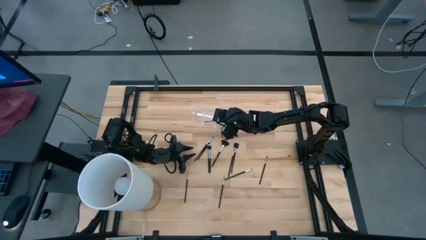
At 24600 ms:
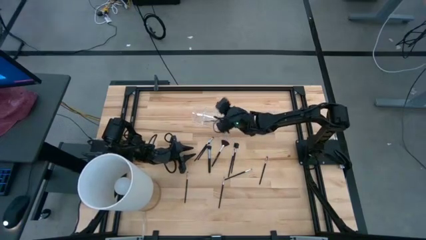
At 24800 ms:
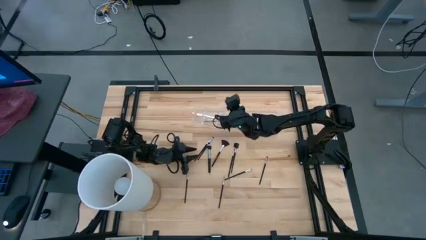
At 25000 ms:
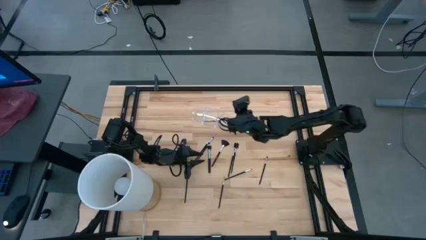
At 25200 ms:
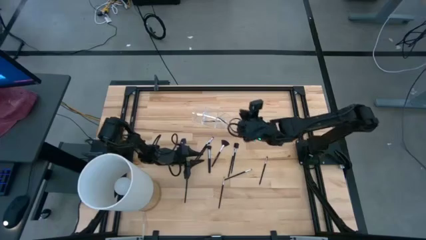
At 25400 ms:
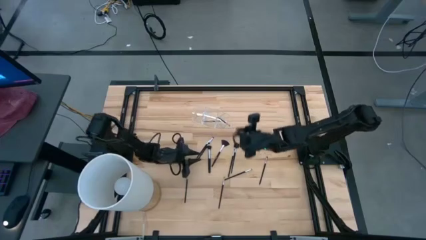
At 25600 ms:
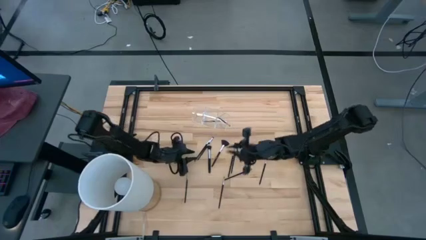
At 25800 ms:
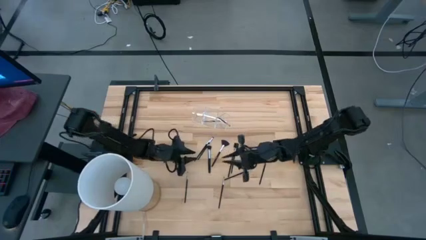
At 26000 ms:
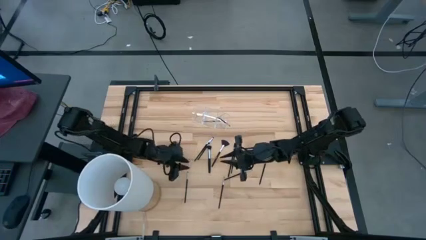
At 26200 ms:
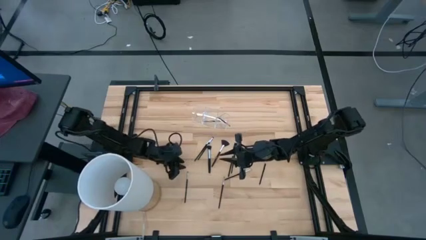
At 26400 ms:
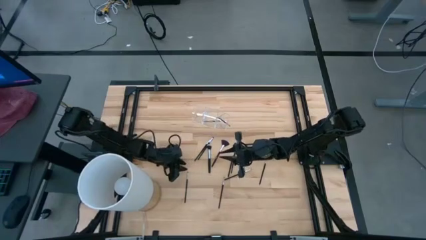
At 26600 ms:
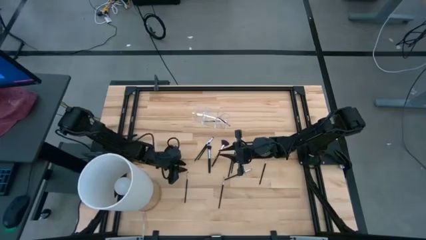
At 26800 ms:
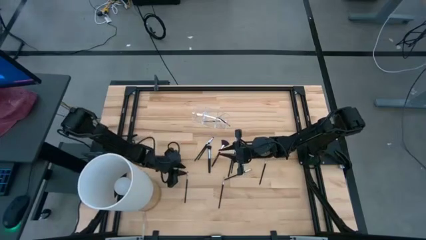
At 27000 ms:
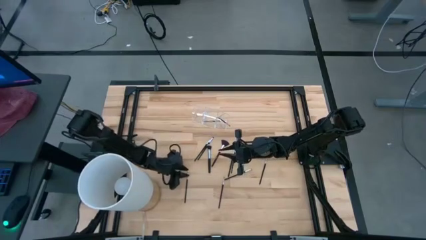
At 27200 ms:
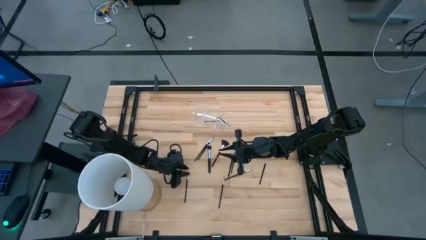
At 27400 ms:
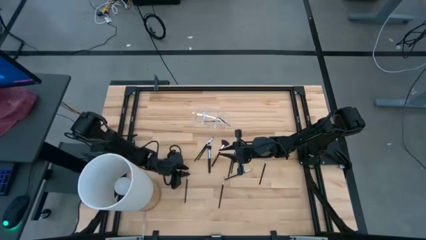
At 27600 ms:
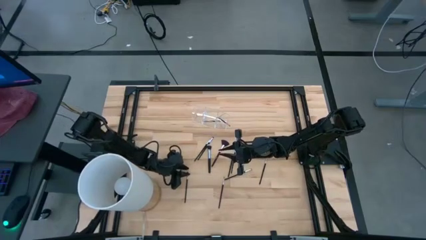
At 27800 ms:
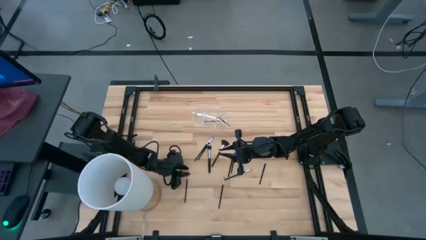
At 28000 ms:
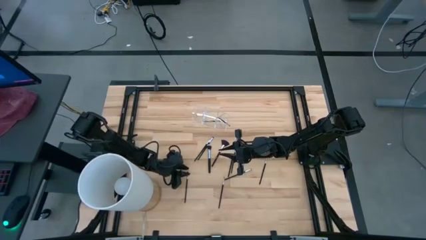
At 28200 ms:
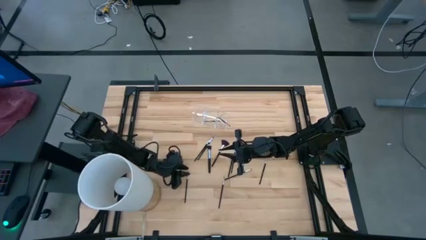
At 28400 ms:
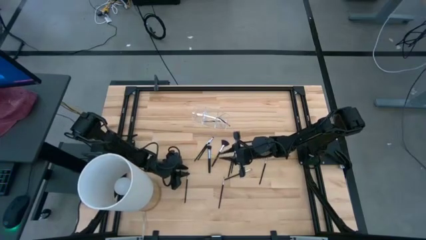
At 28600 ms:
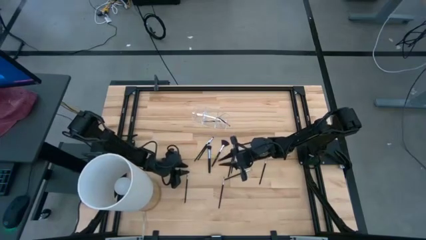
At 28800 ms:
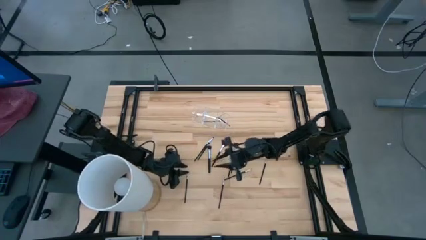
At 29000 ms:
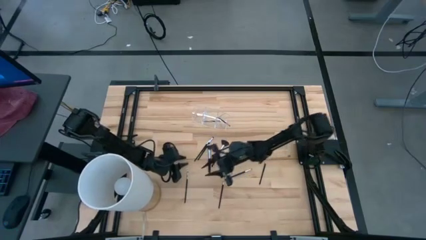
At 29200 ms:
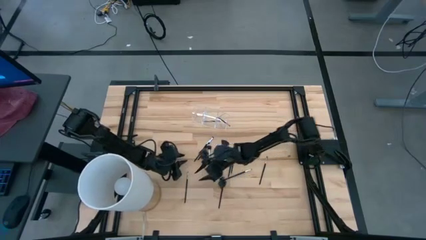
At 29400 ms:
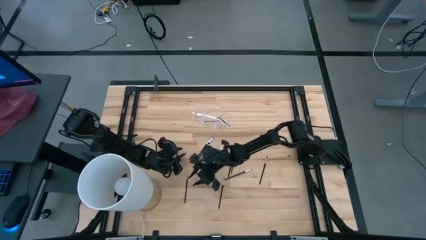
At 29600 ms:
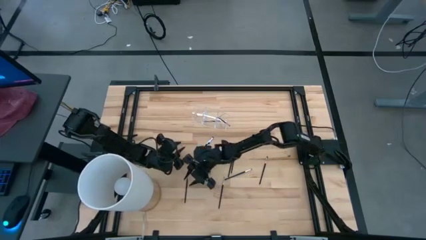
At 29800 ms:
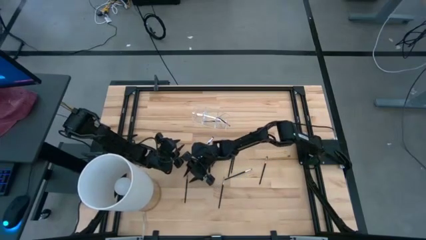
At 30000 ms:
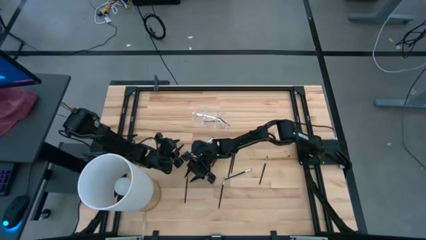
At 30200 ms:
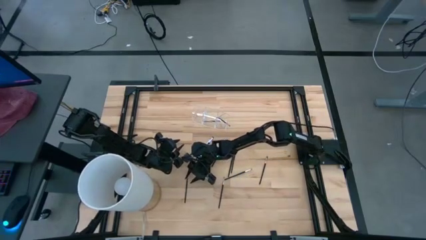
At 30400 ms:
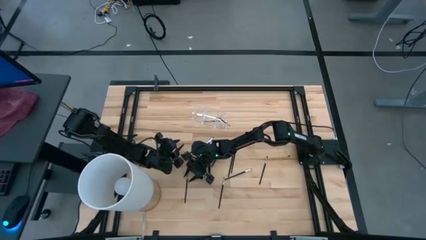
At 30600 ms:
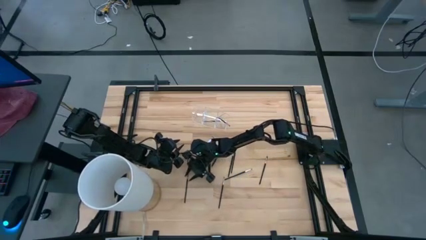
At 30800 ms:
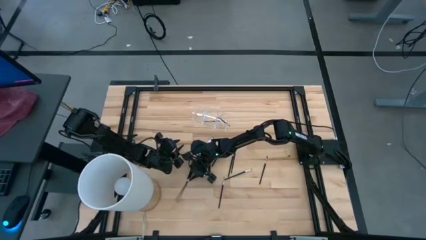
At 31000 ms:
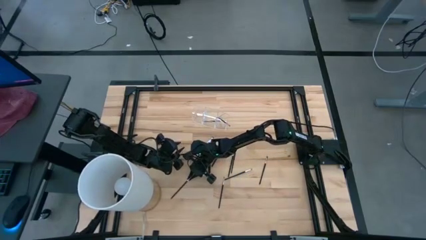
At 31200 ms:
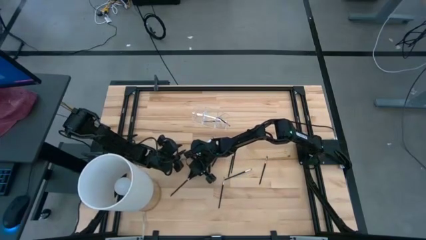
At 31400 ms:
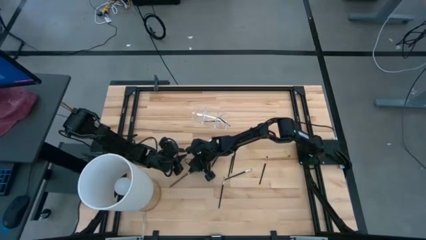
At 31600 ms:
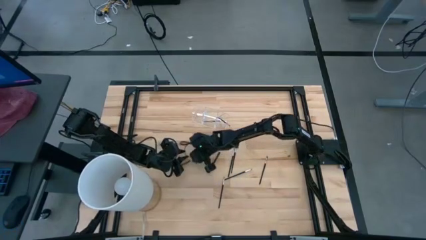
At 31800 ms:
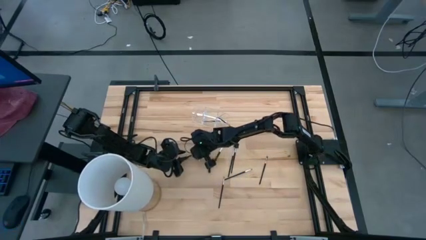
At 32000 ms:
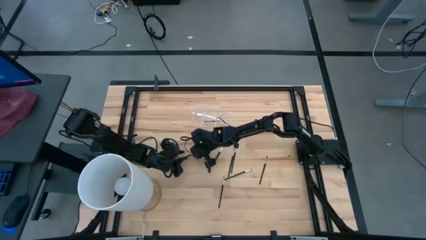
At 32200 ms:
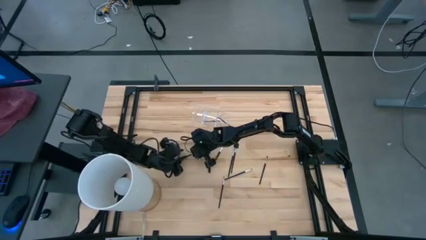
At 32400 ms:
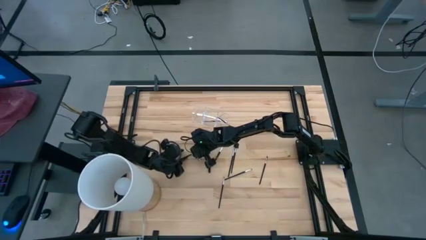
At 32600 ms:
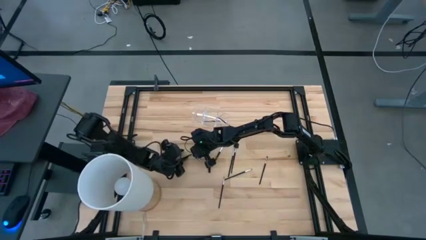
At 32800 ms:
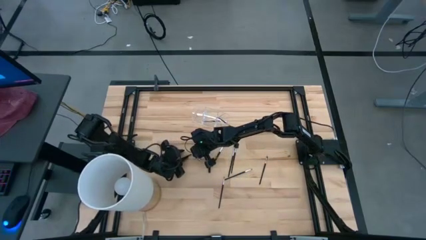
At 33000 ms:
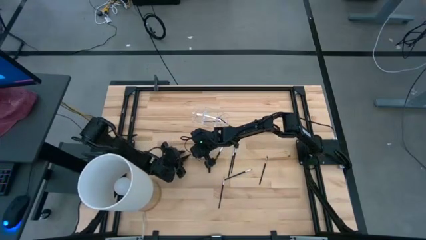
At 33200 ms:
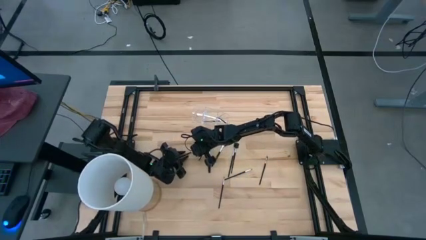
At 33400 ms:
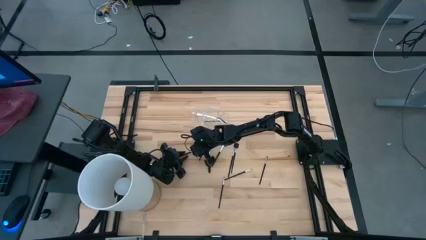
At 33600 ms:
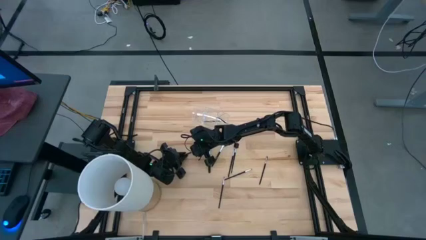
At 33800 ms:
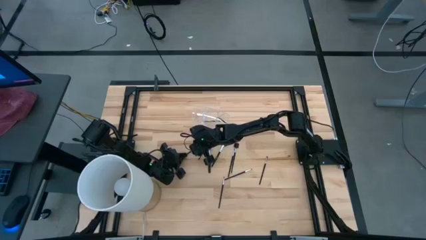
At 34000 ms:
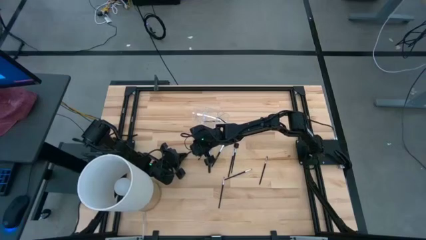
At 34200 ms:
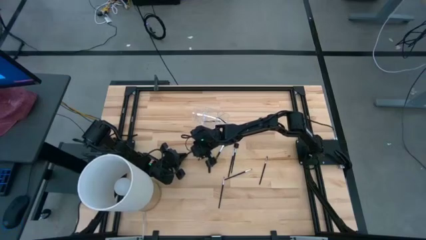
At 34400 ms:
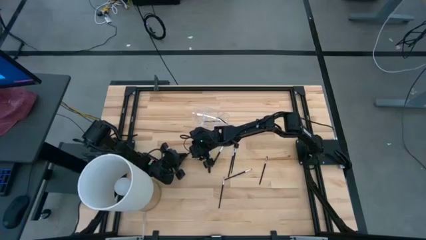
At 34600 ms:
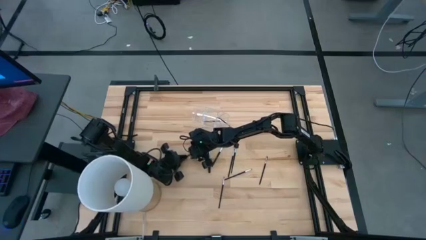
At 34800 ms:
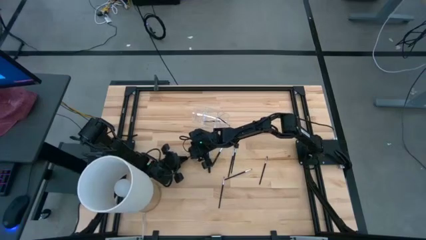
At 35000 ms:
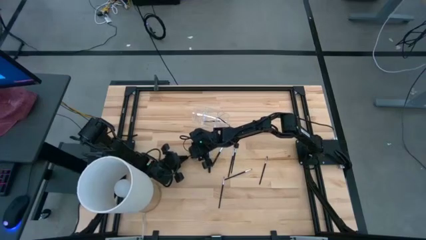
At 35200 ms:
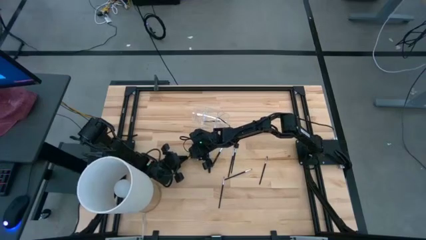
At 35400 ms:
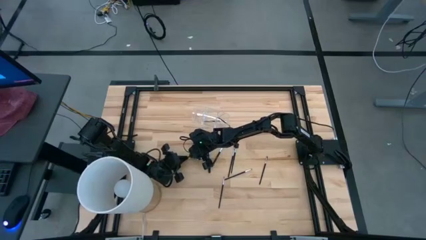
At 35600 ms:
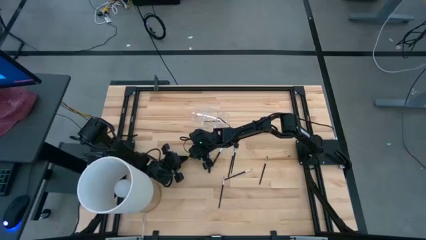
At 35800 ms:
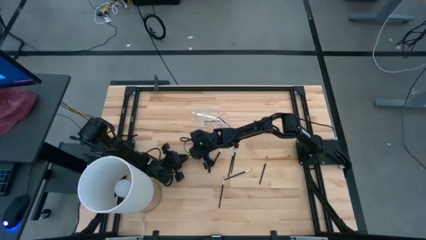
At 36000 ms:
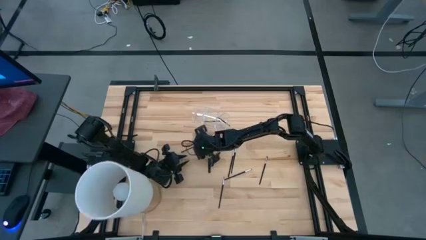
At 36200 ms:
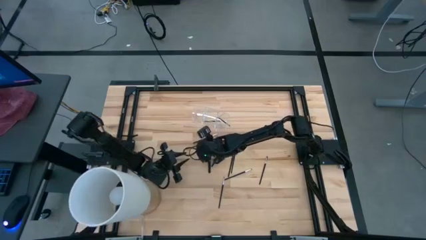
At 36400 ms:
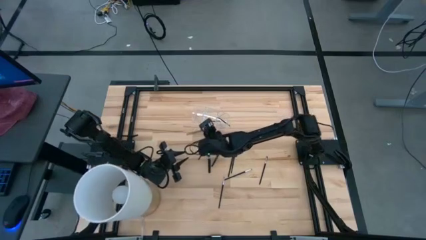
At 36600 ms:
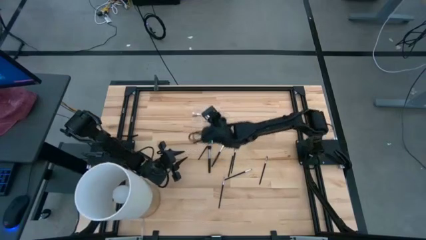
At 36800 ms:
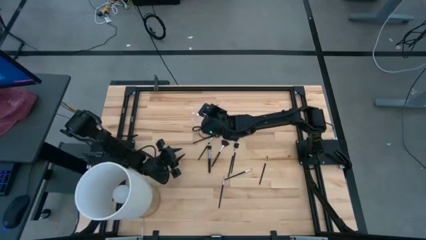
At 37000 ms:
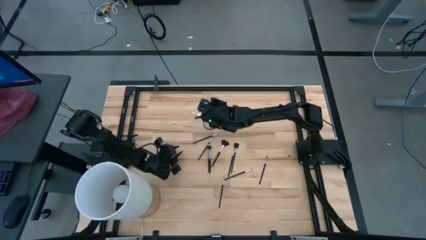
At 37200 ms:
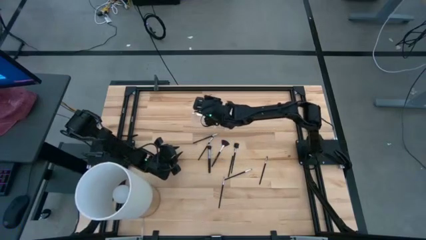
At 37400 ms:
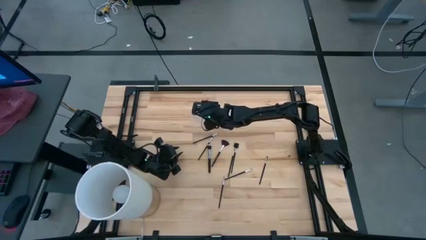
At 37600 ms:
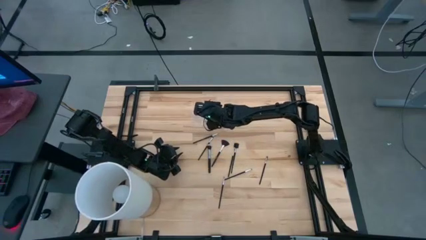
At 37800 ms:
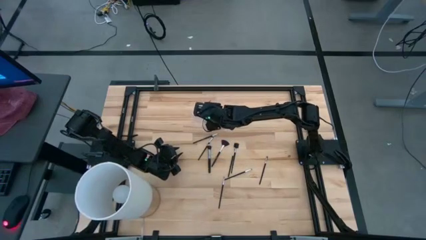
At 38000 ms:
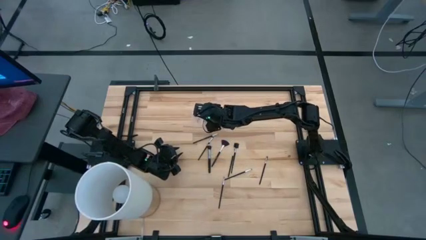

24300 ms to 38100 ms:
Task: Put items in baskets/containers
Put the black eyeshadow brush into the transparent organizer
